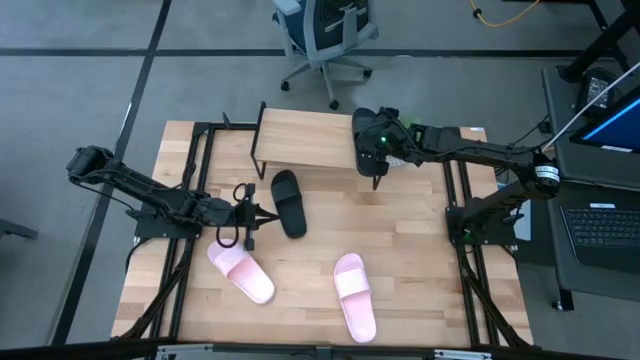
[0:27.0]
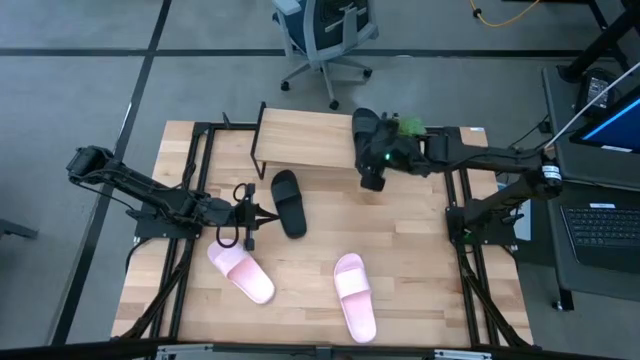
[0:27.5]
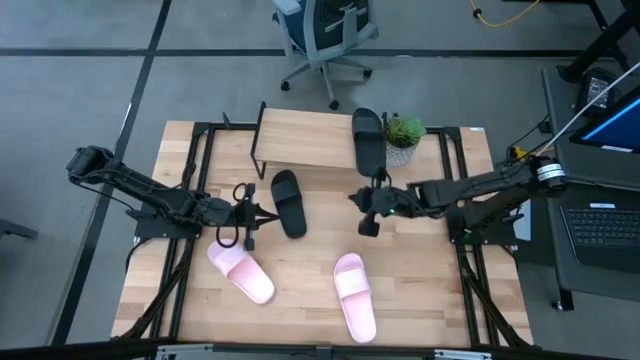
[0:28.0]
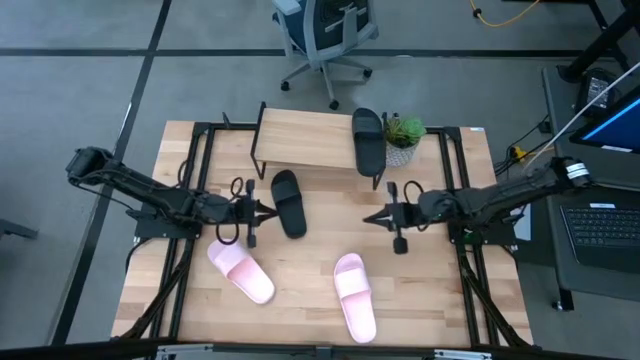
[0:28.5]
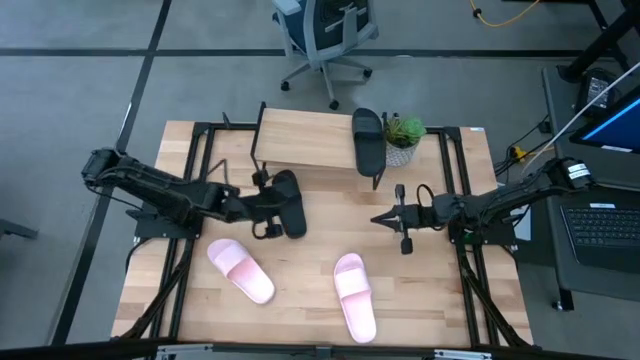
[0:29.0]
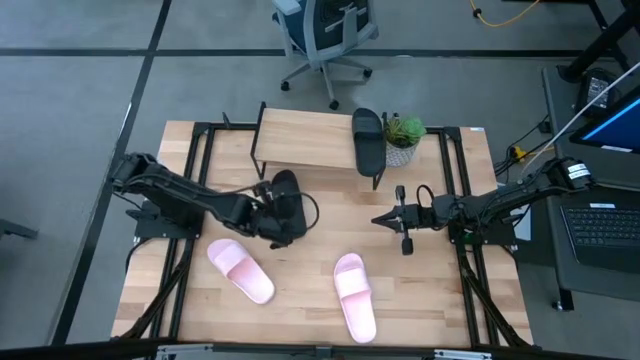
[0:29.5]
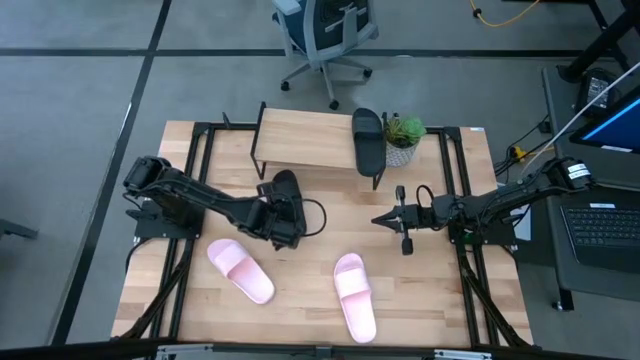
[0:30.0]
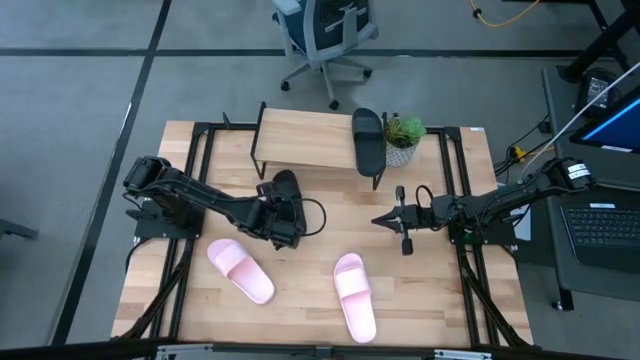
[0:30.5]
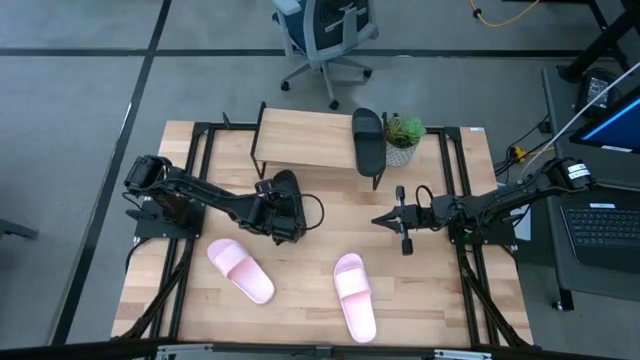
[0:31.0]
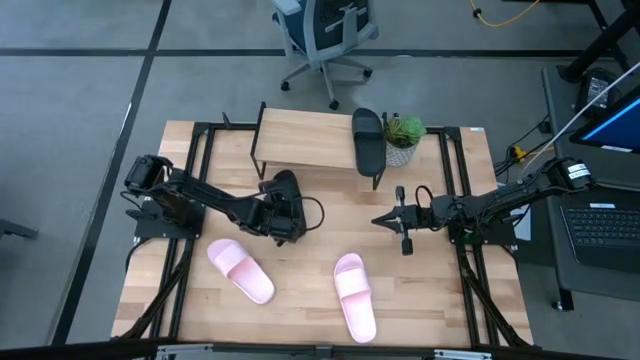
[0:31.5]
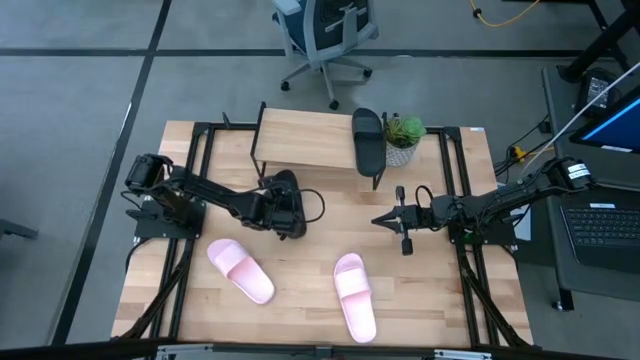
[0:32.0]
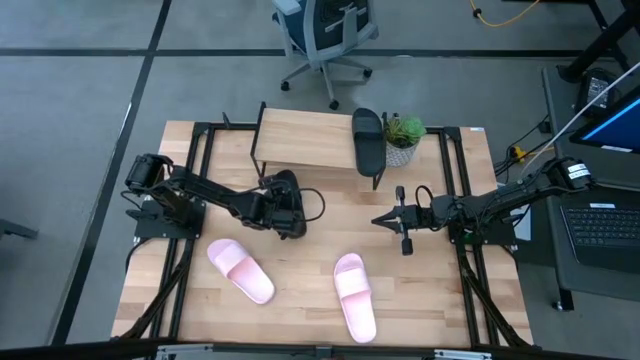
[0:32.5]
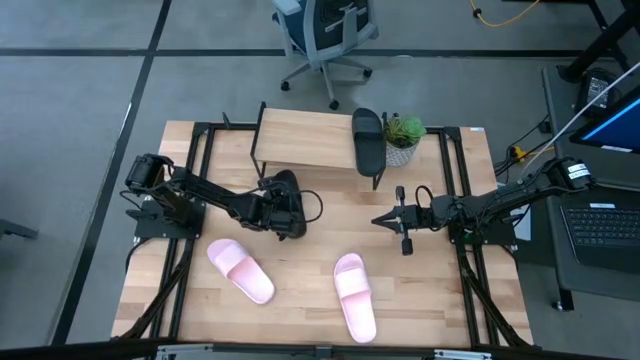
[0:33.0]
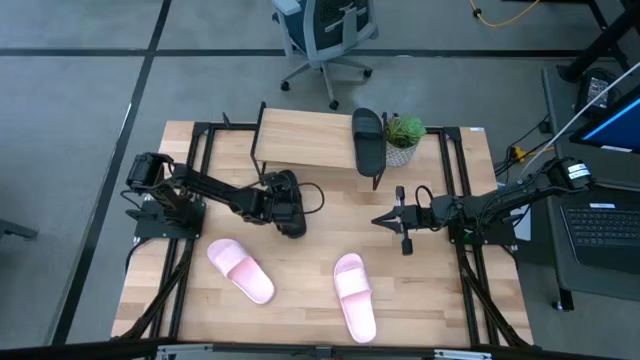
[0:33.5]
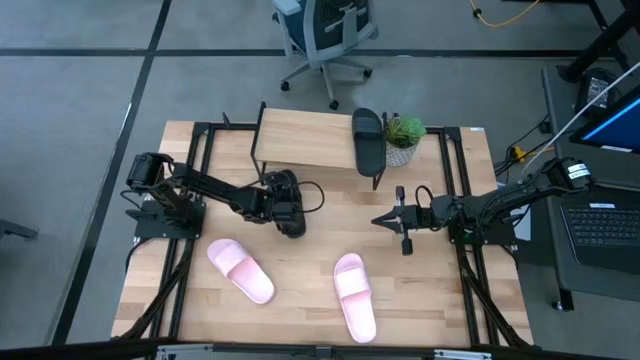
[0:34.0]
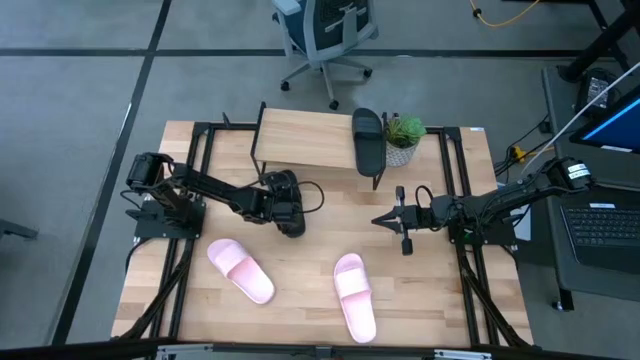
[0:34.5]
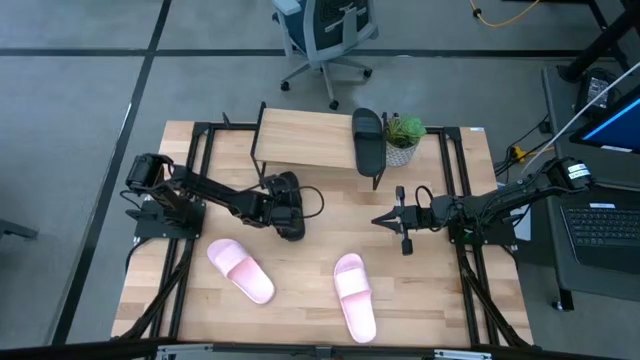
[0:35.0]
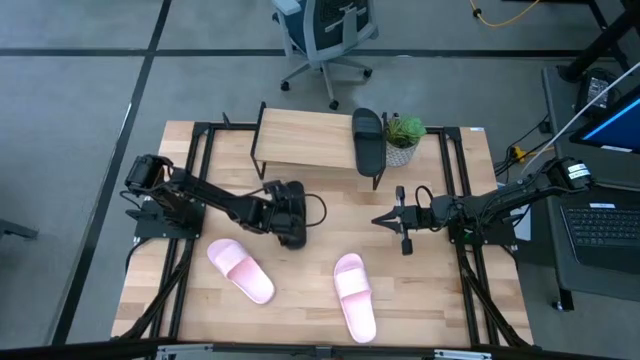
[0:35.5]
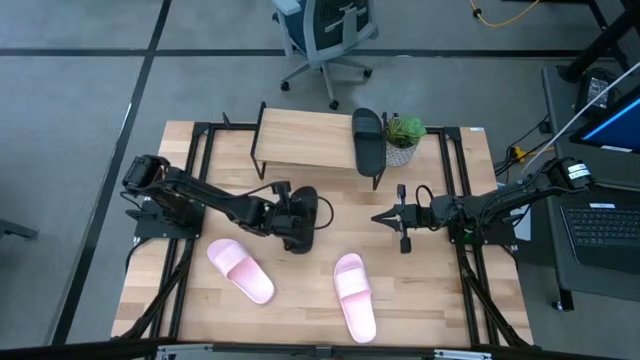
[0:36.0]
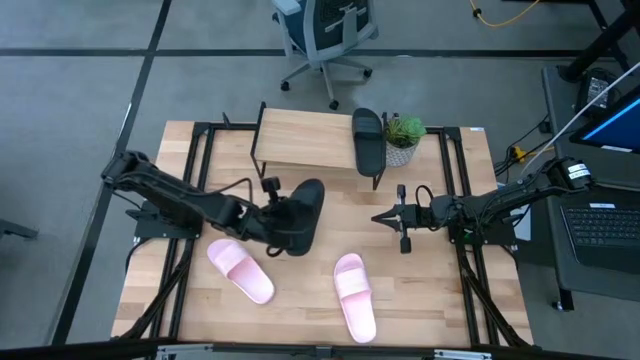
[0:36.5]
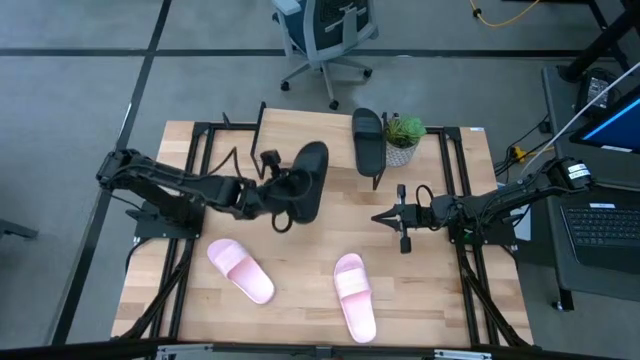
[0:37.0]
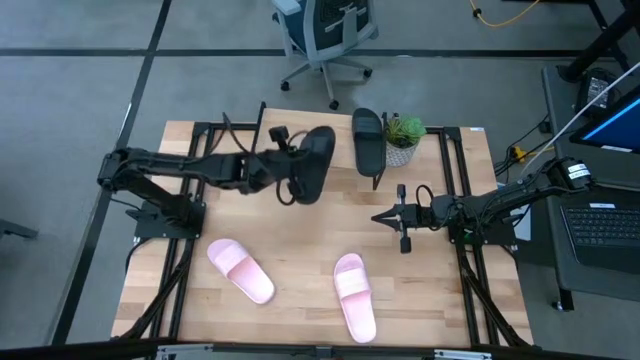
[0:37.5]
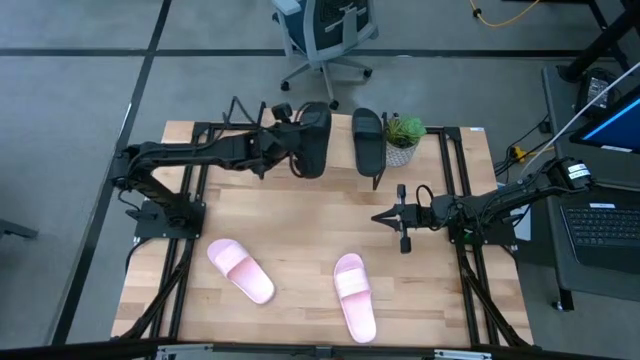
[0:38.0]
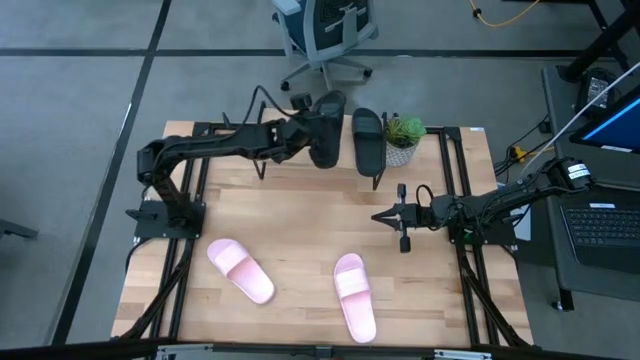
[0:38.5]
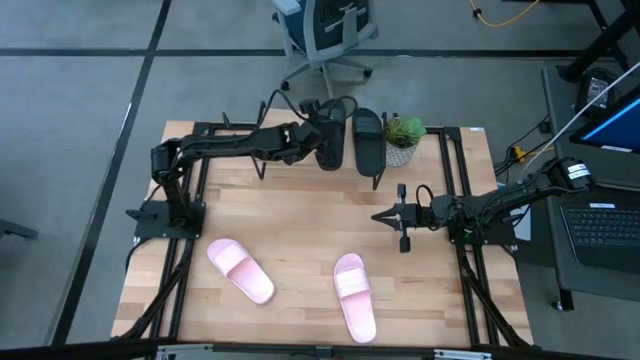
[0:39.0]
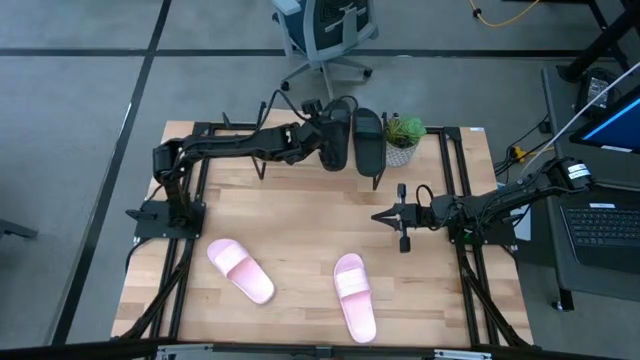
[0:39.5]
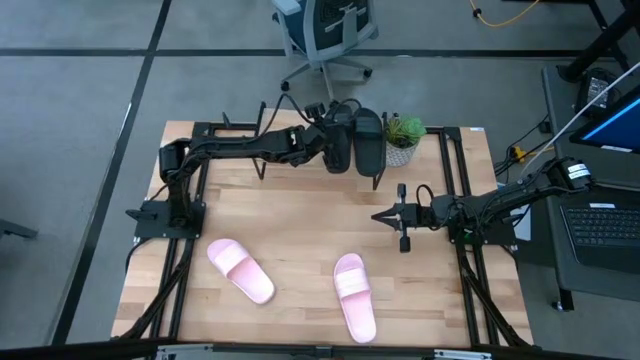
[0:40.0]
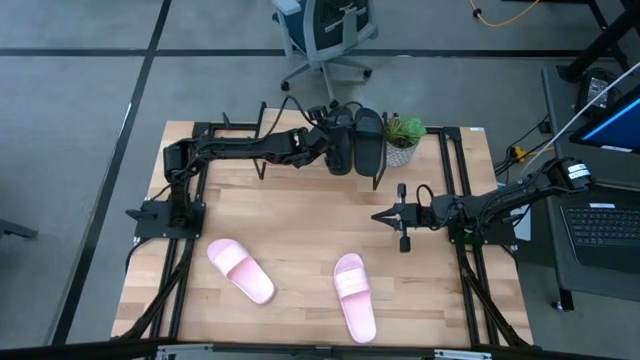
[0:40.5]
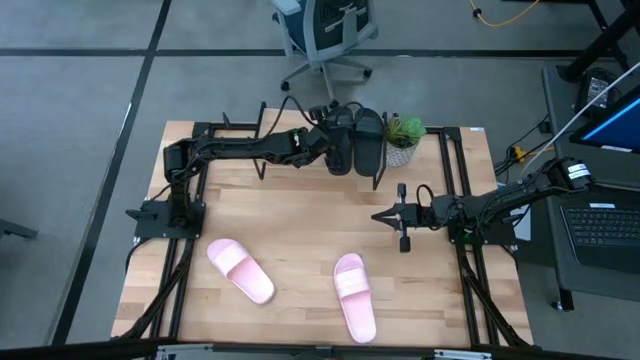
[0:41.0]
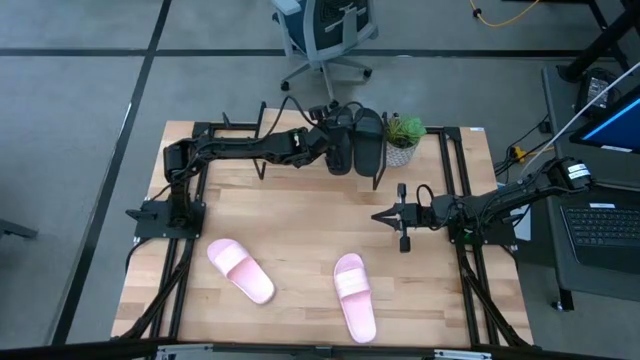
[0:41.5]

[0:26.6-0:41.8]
Task: Pick and place slides into the shelf
Put the black slides on the shelf

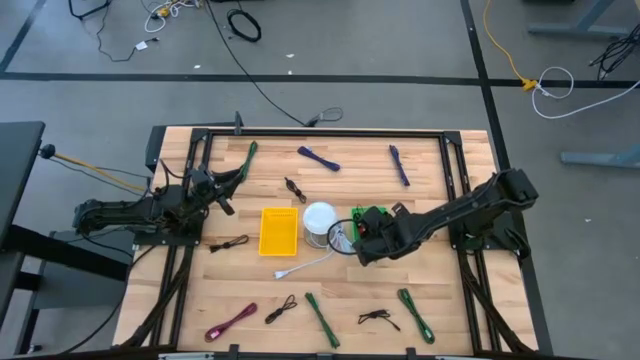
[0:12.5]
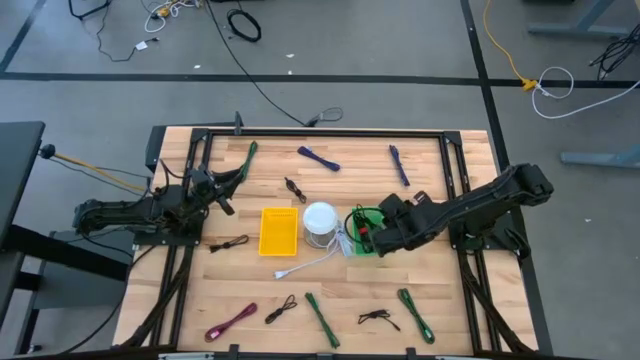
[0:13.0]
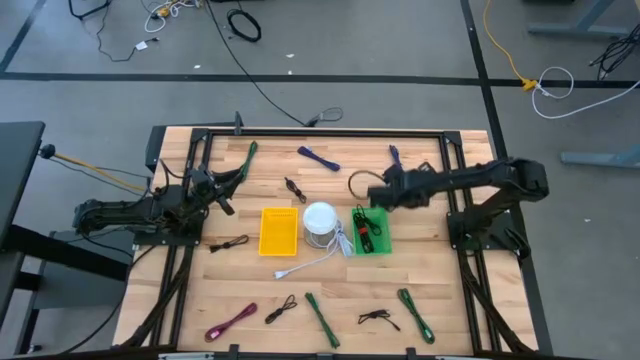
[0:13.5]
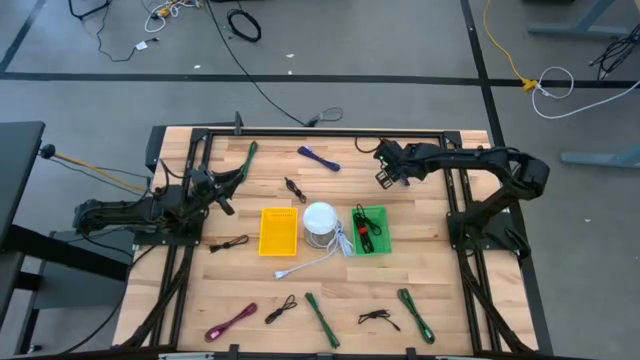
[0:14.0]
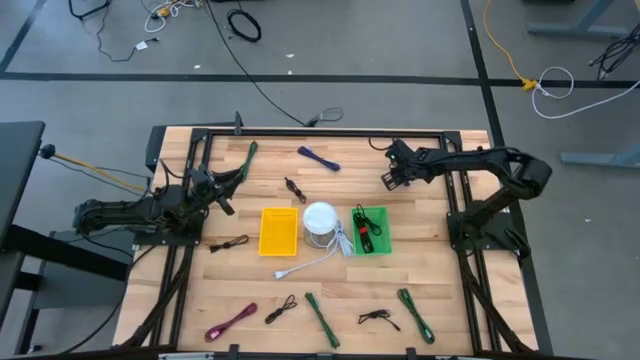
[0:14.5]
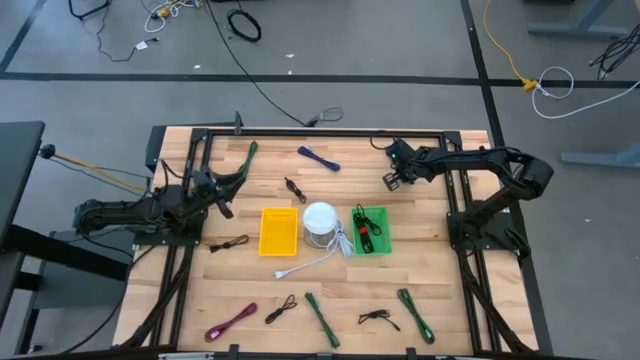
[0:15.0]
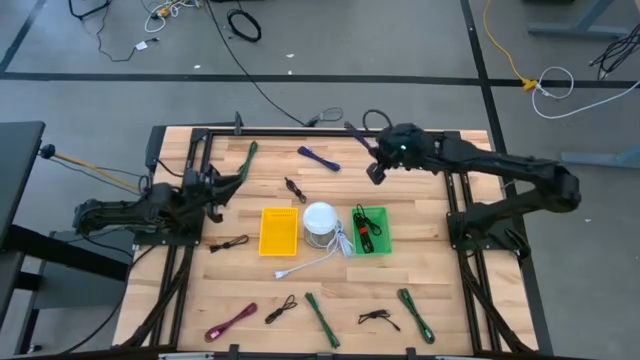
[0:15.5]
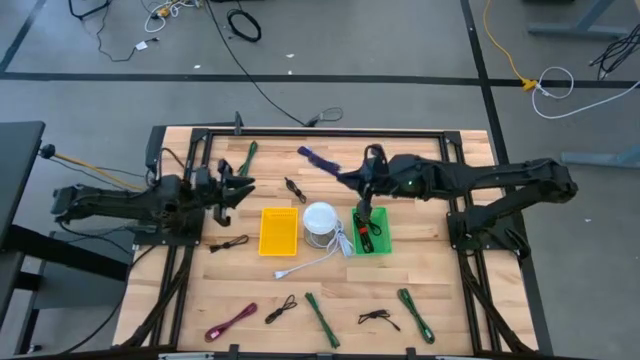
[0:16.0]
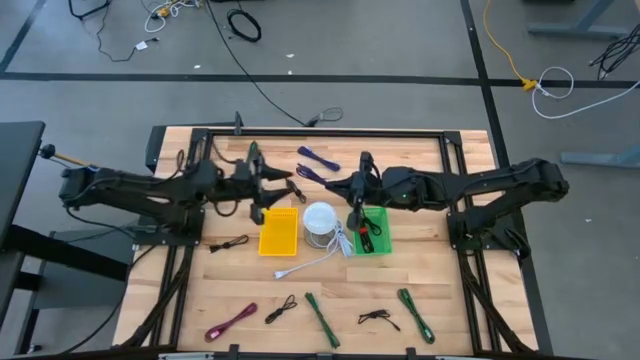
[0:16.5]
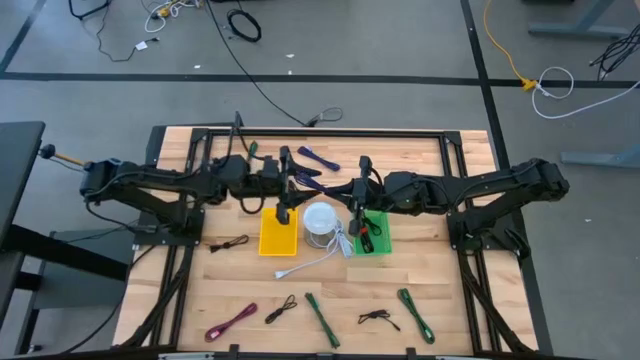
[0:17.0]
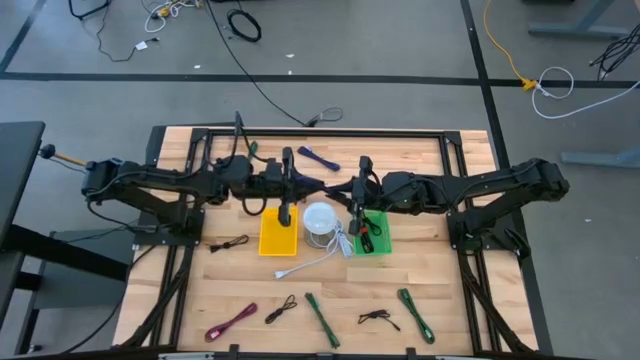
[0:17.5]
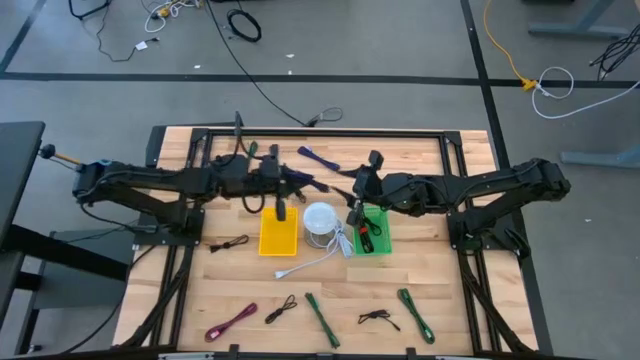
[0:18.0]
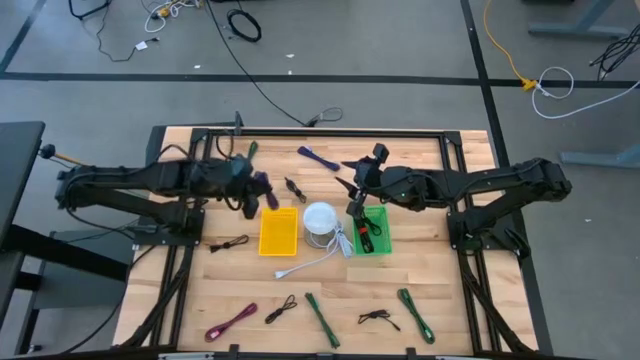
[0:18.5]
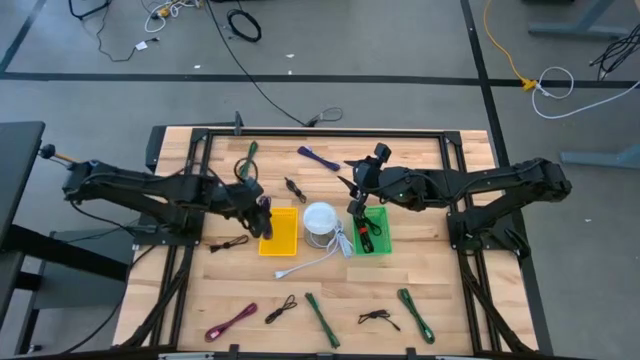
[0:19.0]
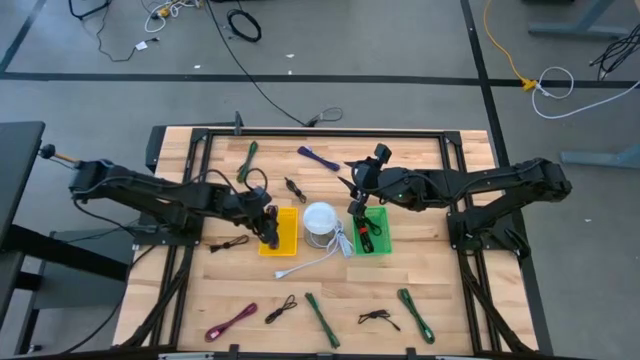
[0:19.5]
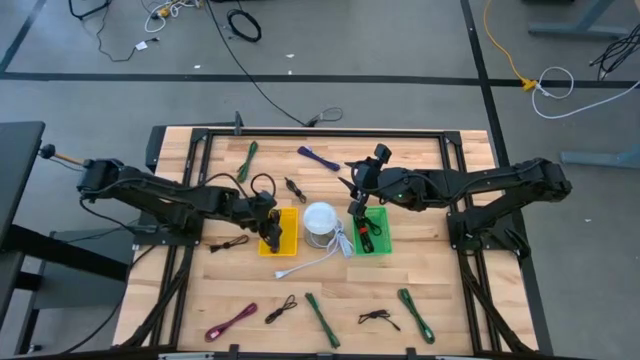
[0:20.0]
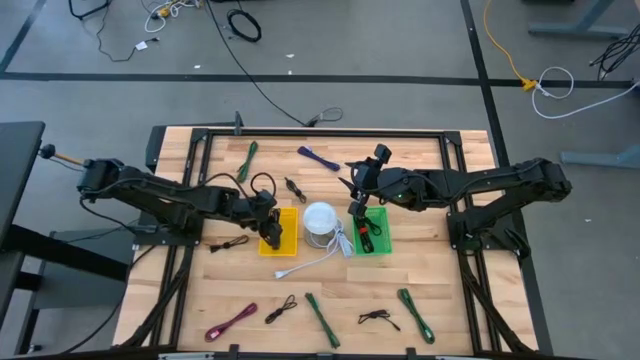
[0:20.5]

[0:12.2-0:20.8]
Task: Pick & Place USB Port
Put the black blue charger cable into the yellow basket
